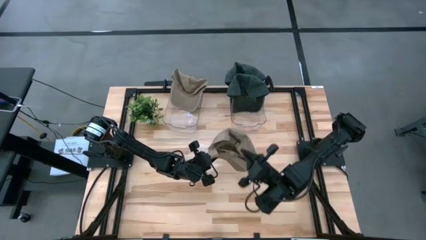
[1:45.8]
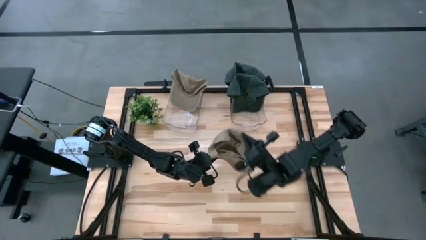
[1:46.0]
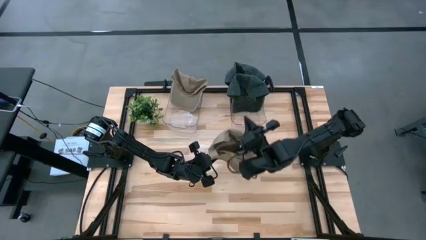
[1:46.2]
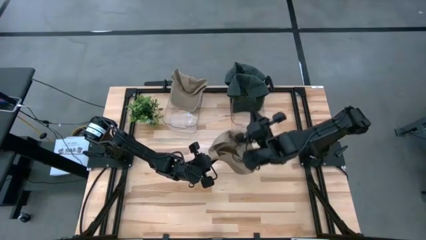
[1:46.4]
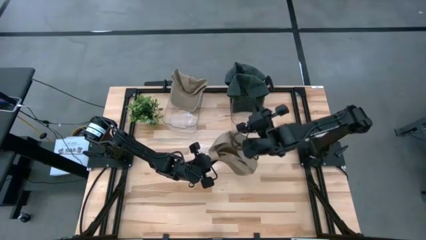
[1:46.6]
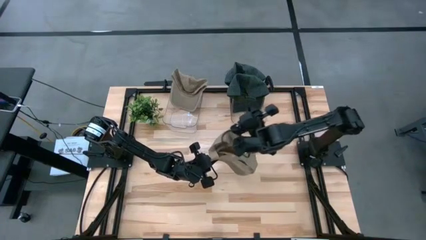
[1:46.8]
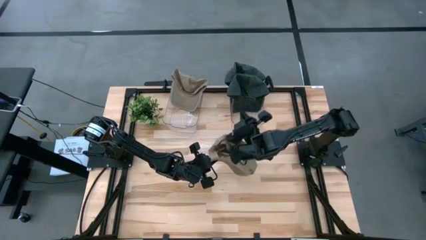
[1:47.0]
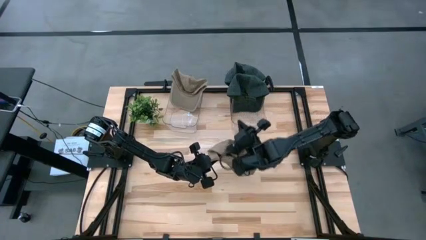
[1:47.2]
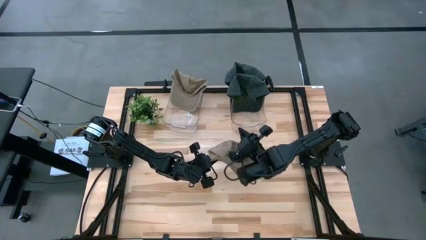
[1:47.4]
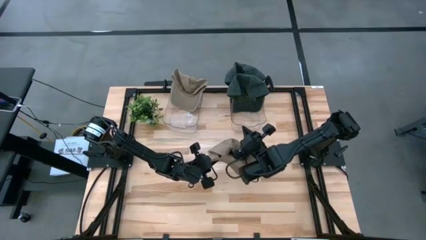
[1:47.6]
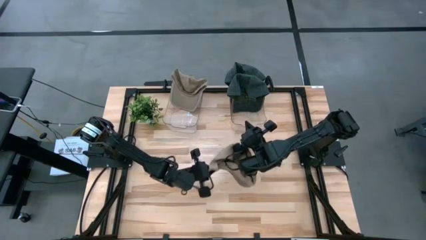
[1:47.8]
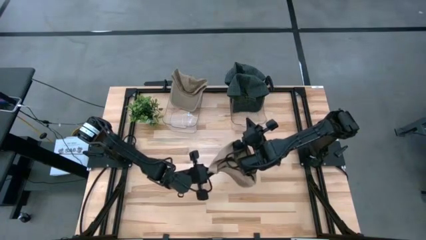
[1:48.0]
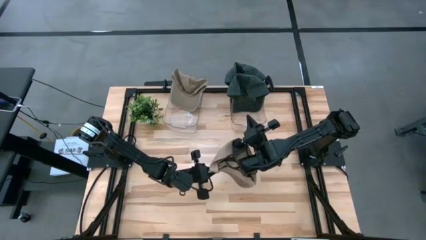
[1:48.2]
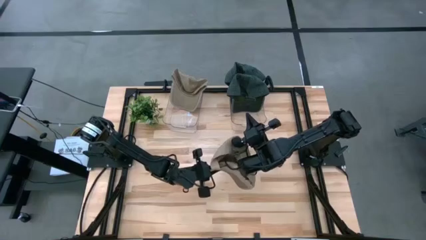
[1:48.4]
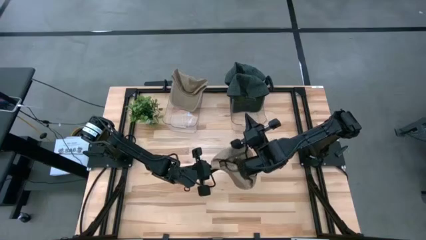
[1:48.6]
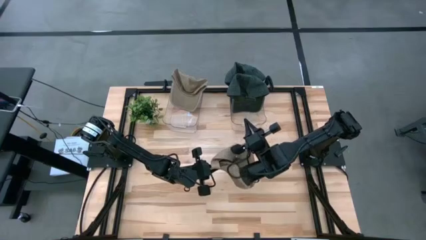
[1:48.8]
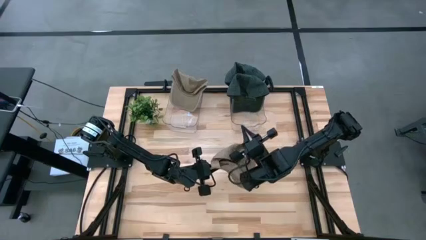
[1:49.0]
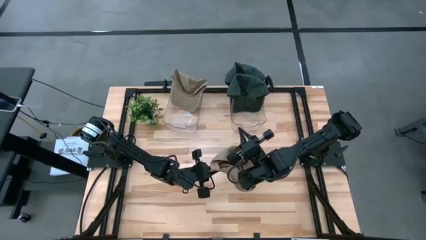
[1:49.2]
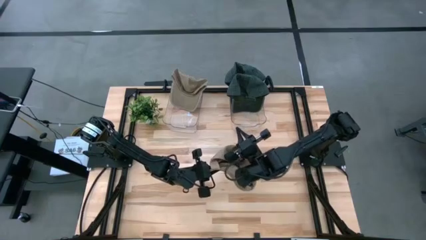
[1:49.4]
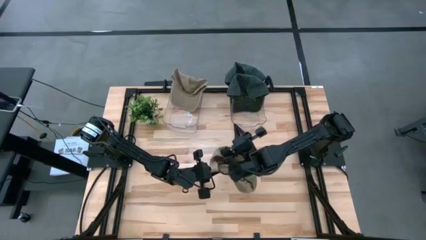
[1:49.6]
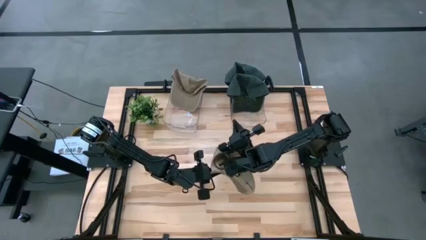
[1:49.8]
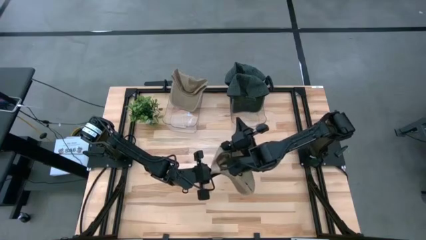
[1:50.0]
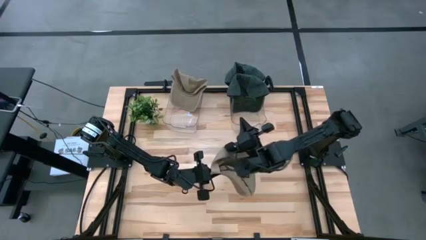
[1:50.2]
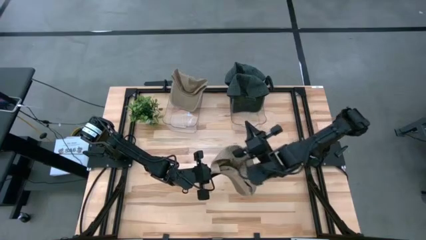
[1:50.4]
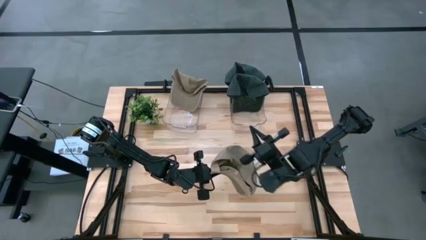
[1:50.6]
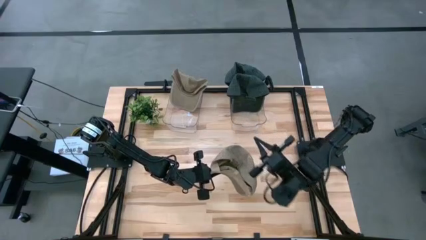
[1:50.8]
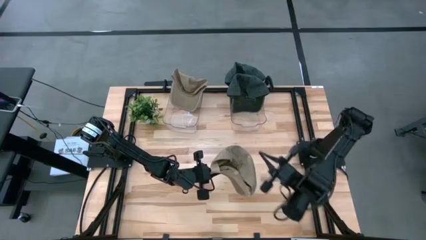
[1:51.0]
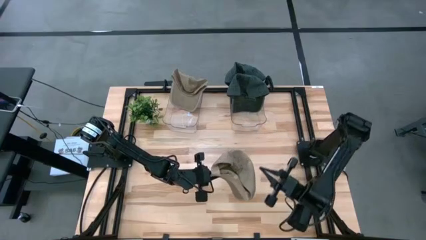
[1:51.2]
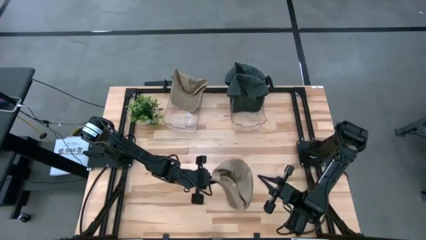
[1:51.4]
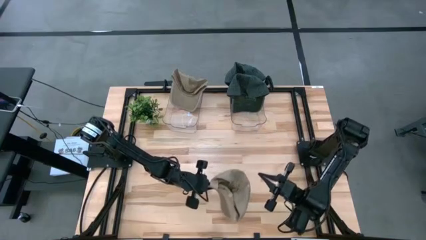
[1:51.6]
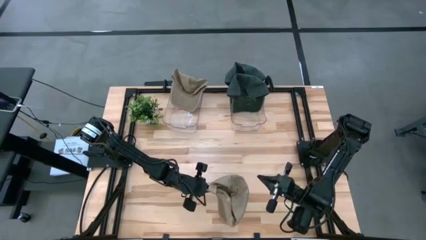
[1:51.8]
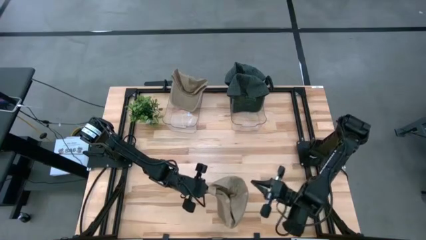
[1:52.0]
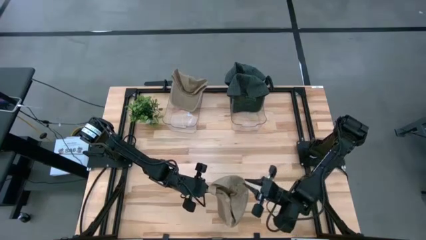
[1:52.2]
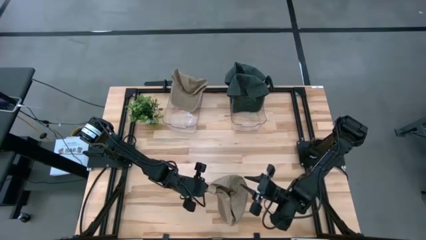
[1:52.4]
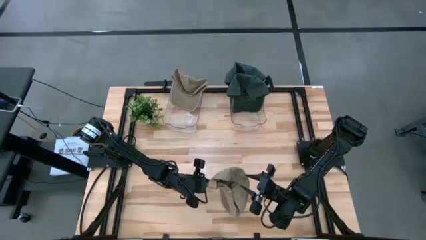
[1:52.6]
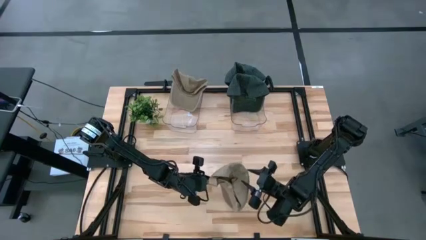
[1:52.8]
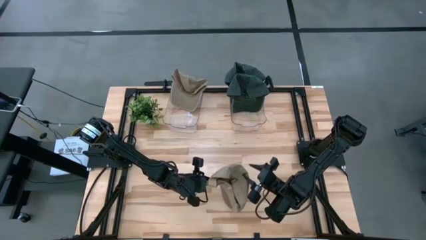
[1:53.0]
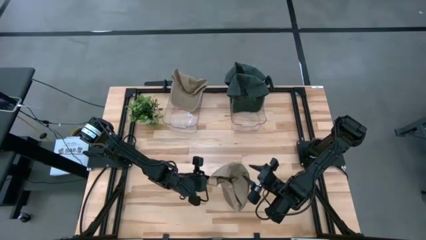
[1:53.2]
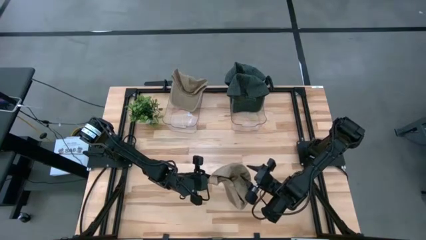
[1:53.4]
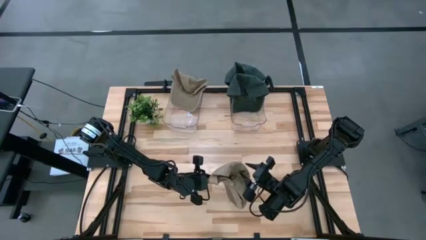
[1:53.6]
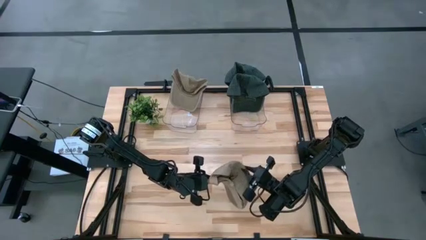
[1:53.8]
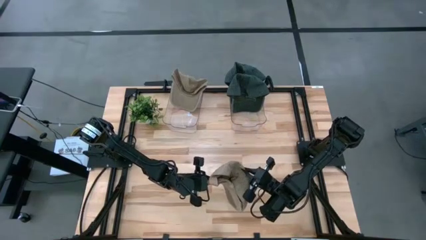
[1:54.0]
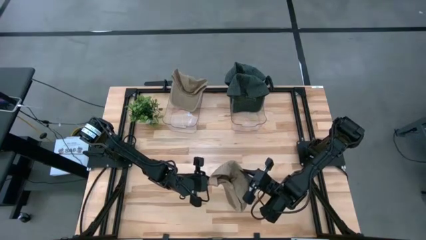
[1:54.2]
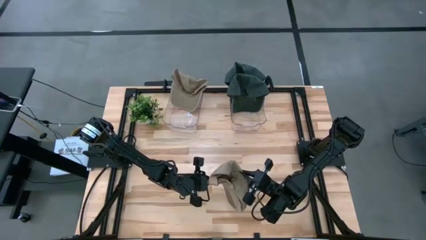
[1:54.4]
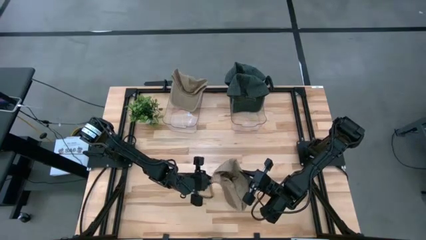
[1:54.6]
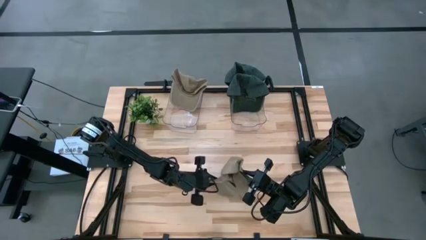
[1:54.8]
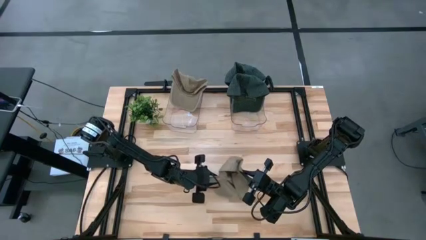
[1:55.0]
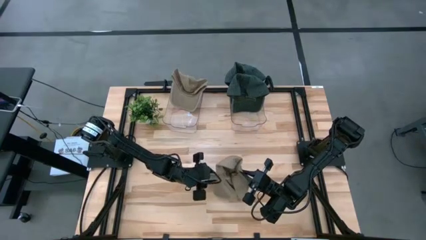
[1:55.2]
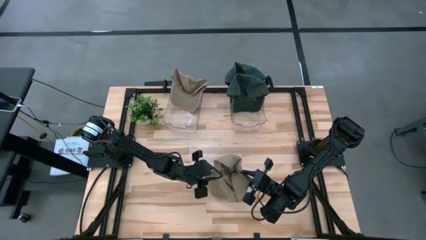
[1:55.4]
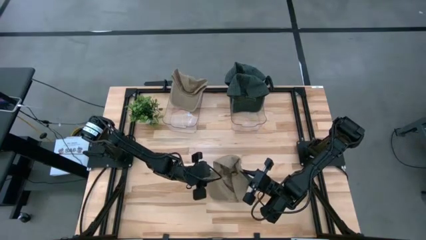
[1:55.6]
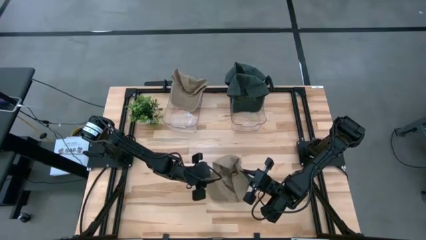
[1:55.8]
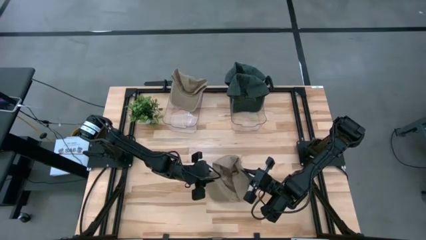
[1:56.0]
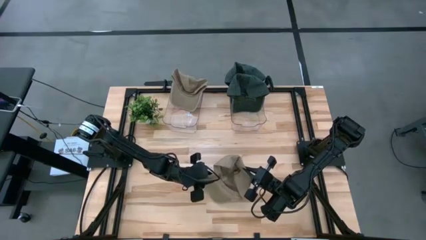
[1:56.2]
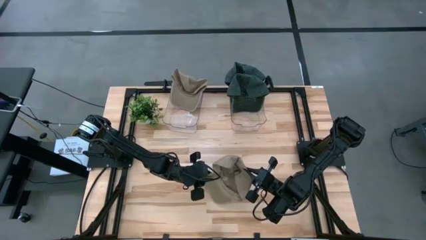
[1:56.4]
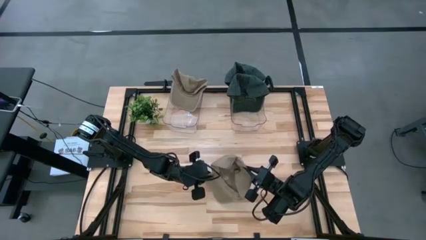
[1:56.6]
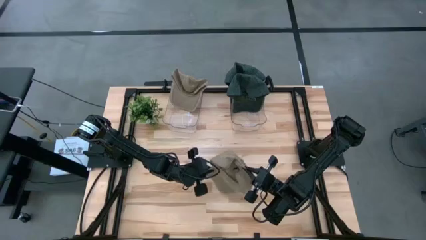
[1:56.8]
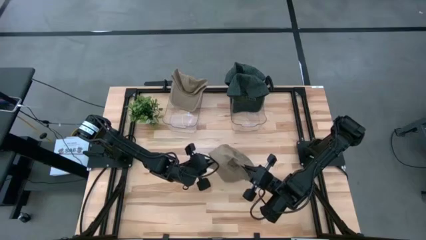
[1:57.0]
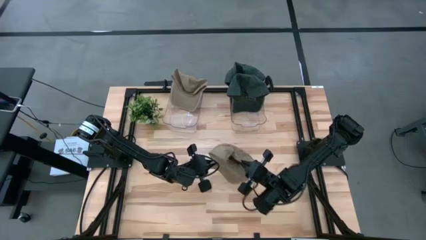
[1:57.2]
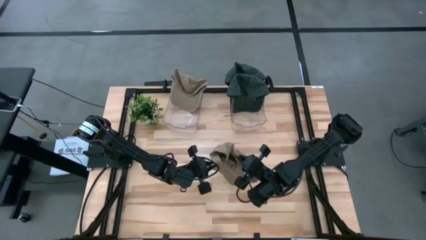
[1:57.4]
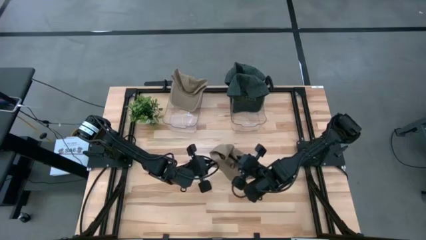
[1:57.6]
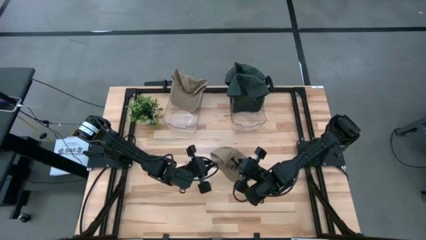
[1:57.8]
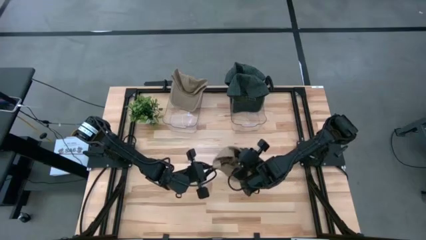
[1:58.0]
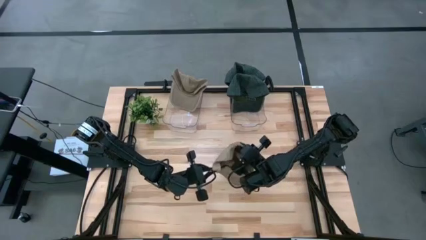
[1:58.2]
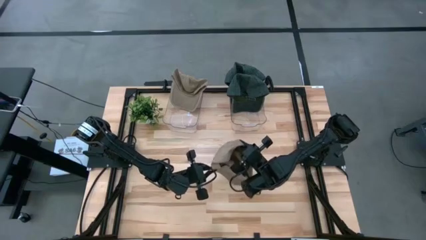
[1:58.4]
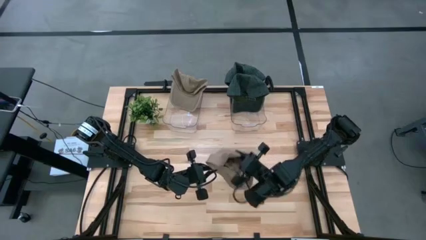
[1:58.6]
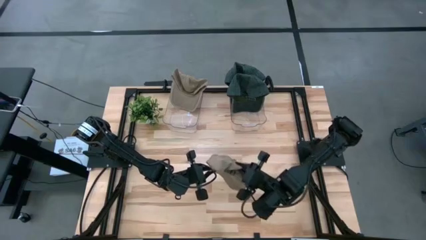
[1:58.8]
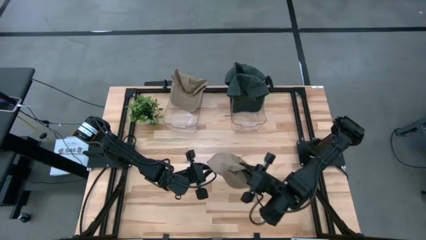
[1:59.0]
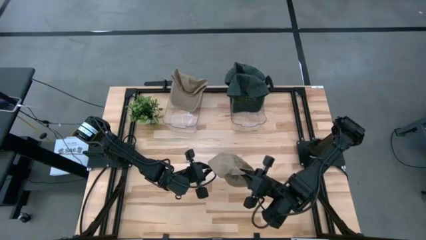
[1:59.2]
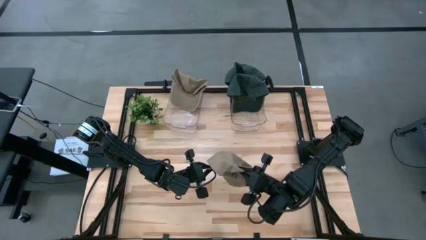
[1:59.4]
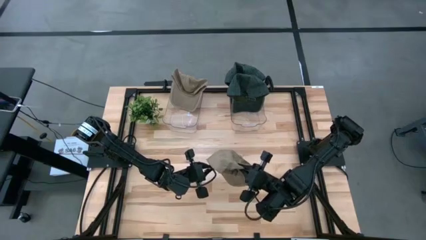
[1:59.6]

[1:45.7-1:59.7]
Task: Pick & Place hat
Put the brown cap into the left transparent bin
